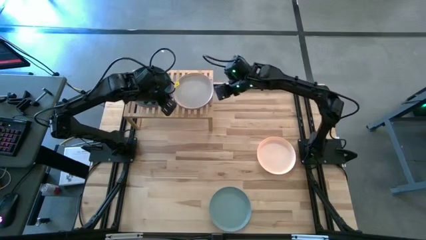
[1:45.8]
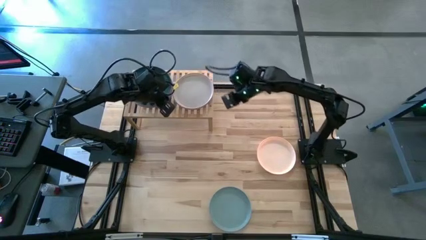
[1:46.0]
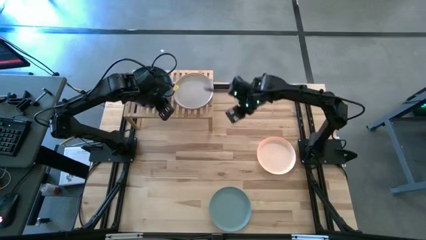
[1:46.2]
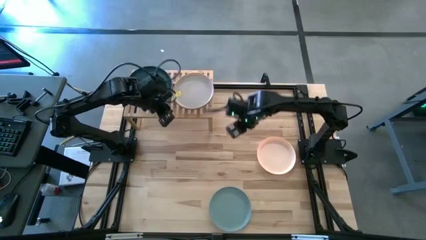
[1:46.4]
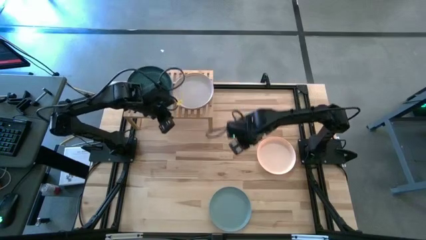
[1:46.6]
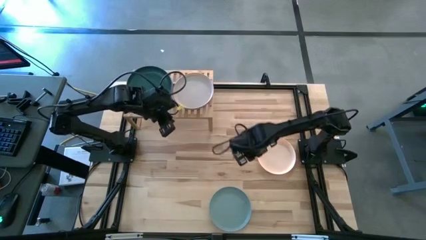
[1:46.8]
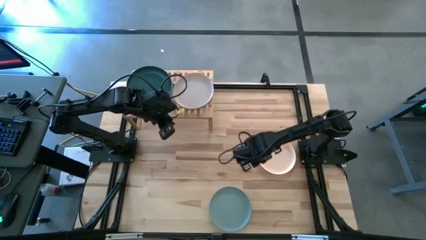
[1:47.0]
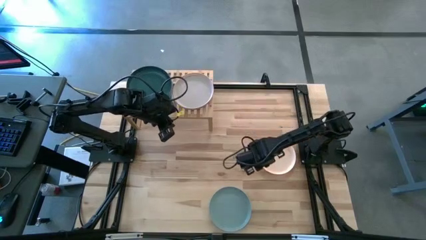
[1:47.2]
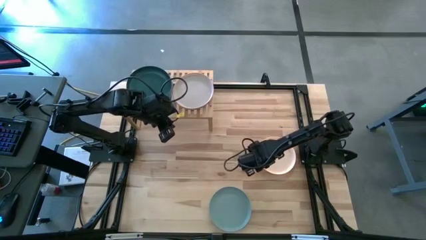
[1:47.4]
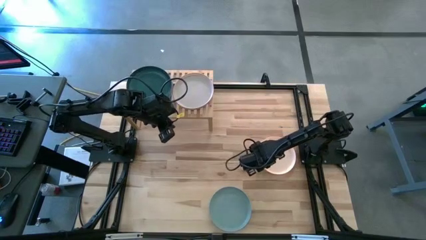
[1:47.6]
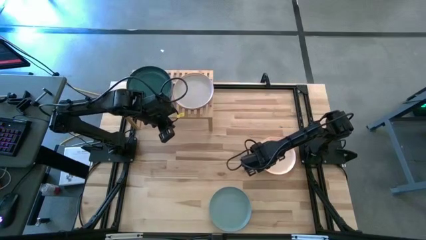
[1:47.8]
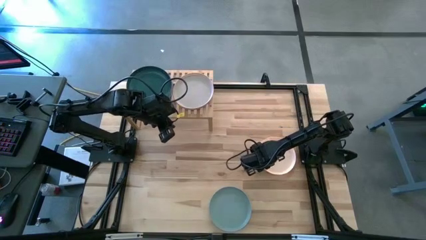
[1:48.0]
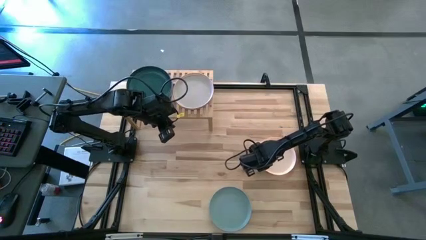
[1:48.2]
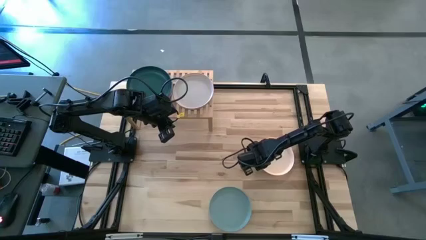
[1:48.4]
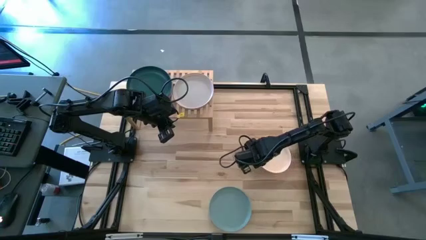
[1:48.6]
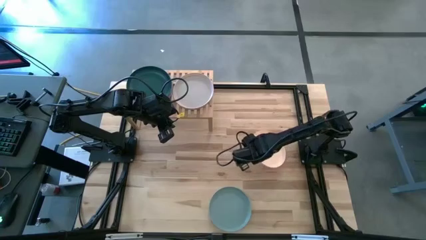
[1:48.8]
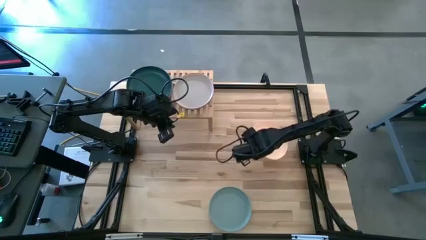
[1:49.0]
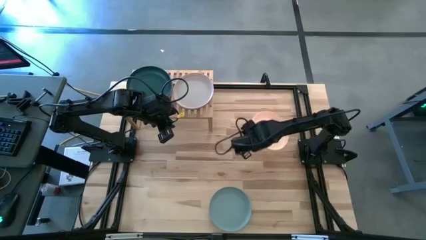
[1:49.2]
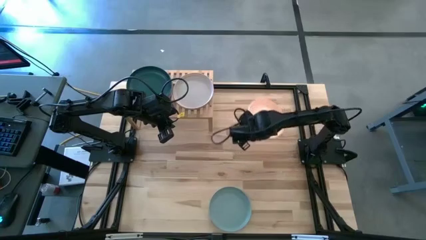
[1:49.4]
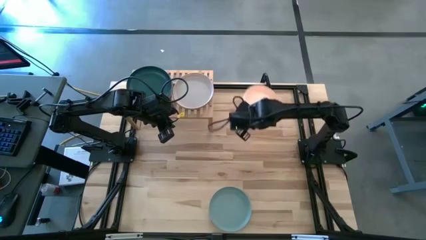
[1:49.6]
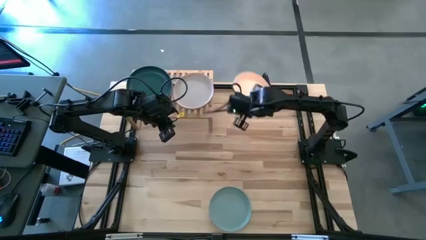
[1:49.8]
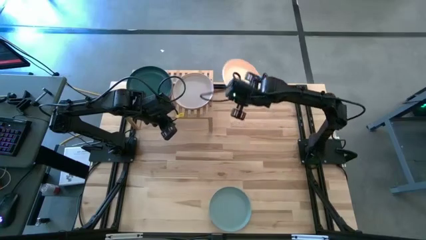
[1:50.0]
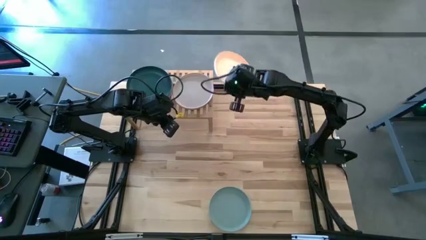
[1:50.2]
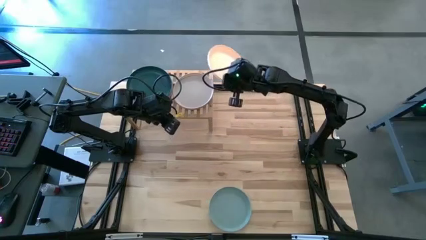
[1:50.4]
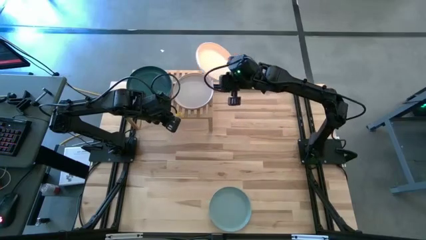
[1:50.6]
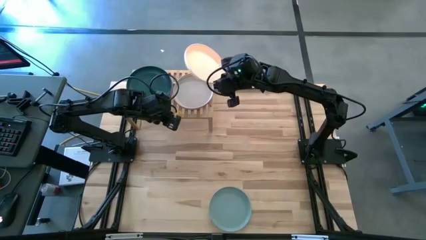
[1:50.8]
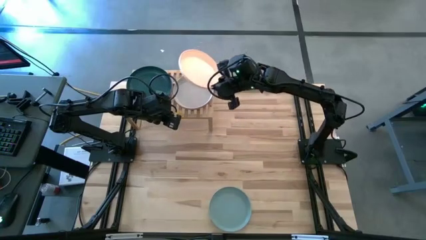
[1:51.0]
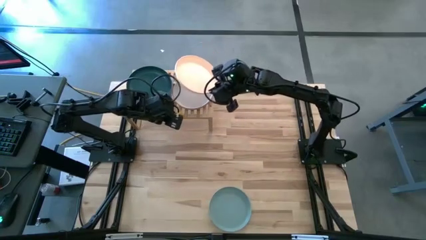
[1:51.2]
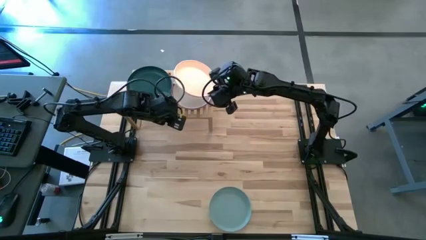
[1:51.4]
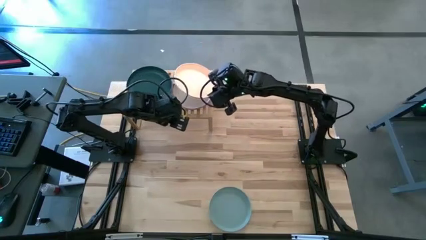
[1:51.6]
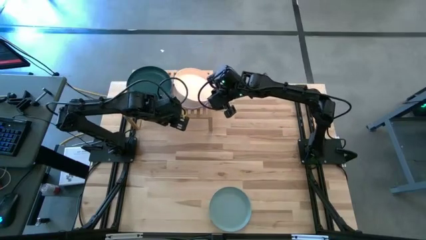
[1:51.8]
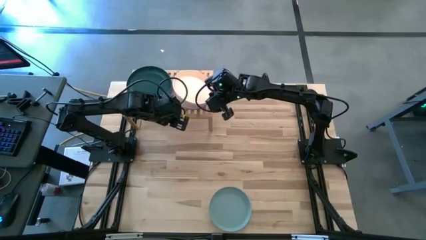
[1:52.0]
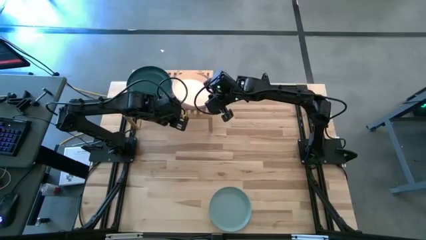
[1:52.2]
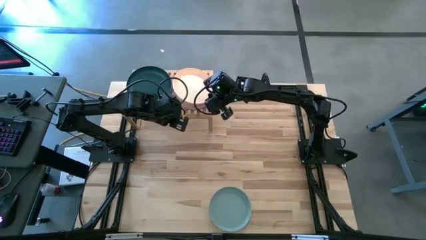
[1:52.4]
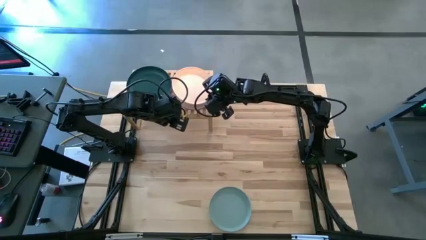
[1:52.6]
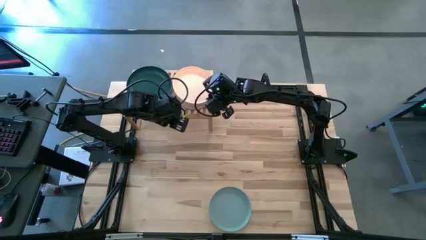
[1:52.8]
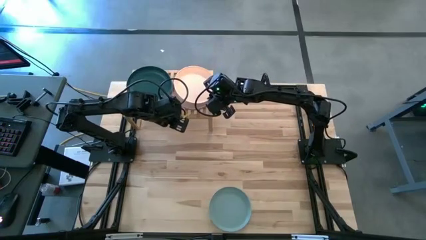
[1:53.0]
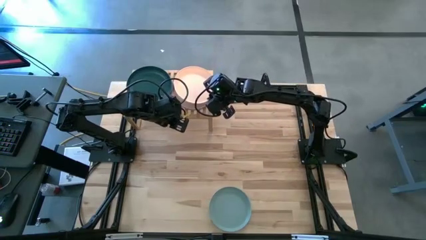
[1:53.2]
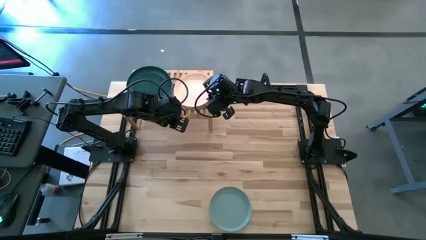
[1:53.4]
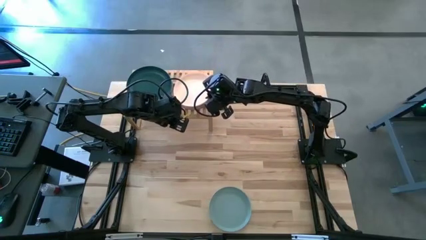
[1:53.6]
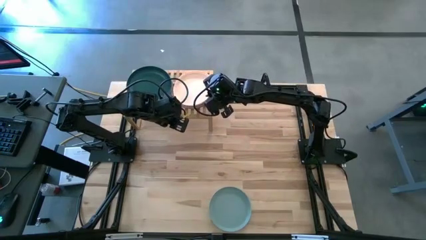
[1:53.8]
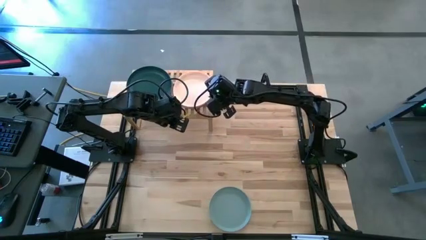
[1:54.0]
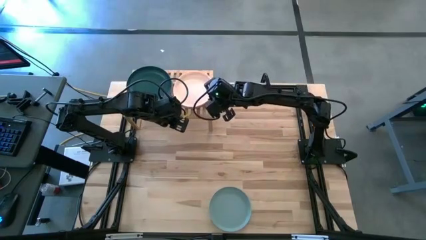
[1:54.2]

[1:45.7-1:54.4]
Task: Place and stack plates onto a shelf
Stack the white plate on the gray plate

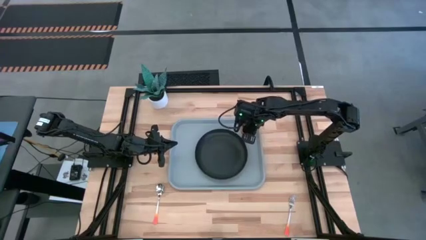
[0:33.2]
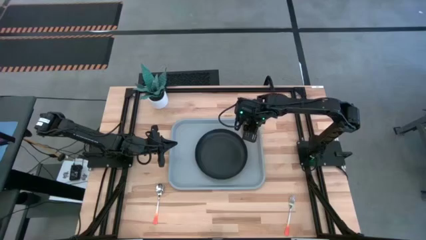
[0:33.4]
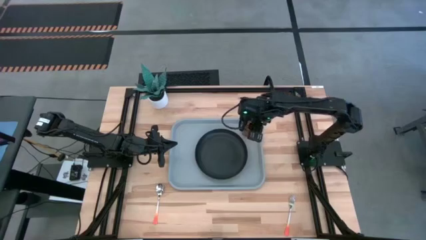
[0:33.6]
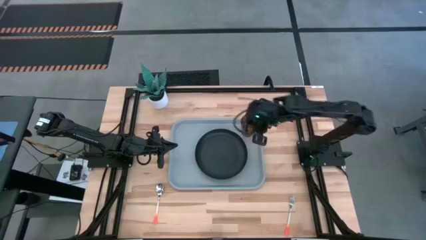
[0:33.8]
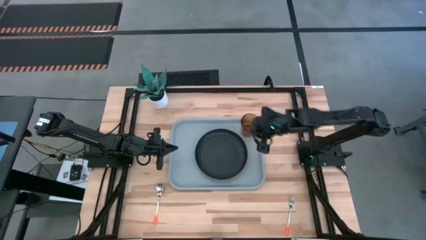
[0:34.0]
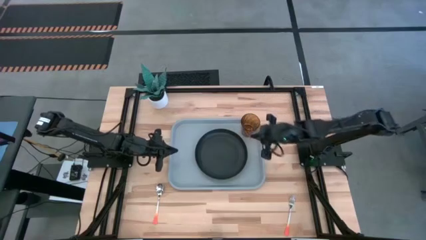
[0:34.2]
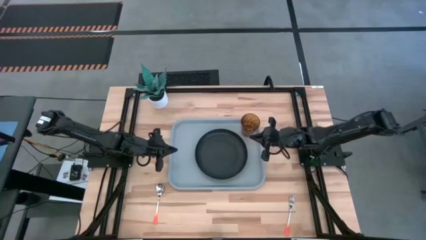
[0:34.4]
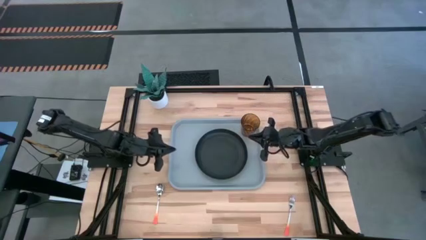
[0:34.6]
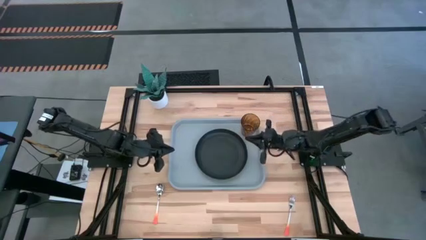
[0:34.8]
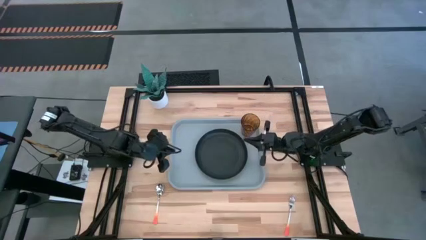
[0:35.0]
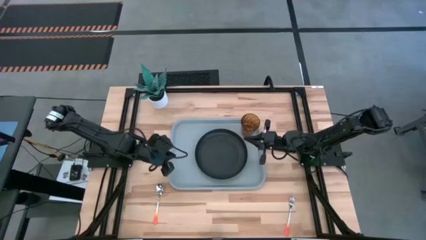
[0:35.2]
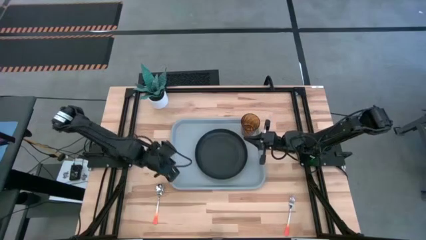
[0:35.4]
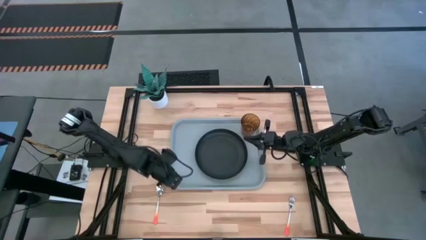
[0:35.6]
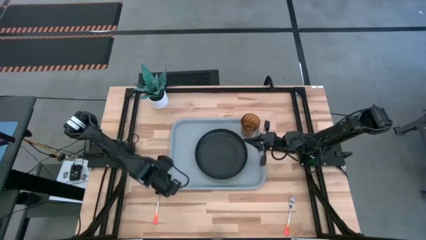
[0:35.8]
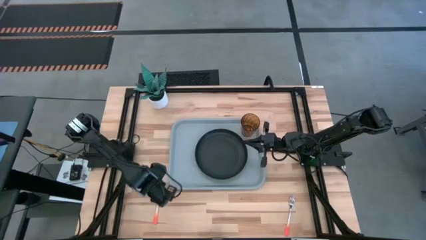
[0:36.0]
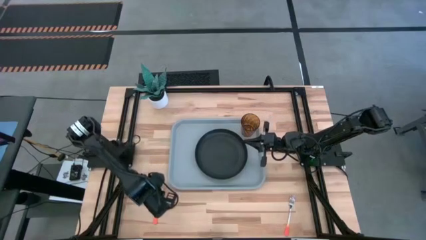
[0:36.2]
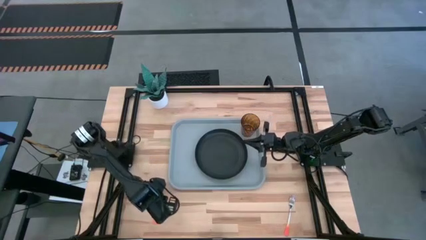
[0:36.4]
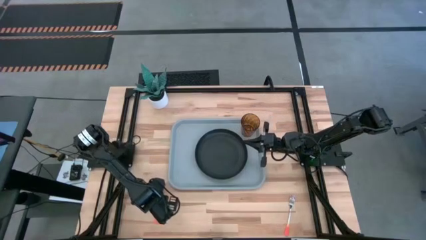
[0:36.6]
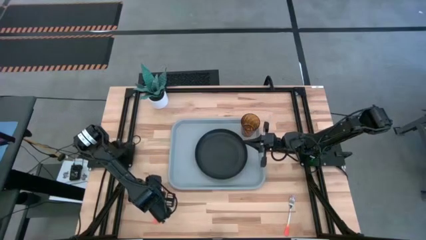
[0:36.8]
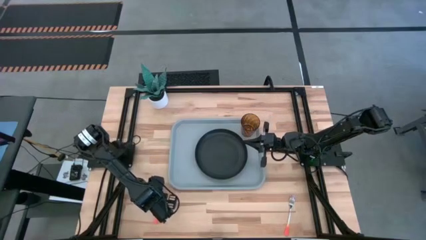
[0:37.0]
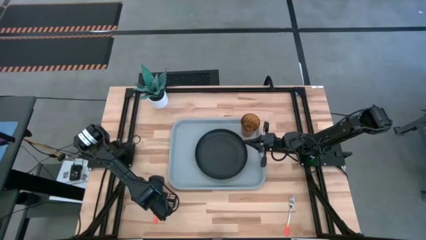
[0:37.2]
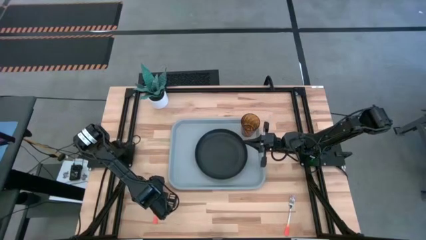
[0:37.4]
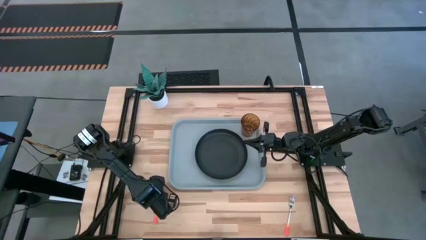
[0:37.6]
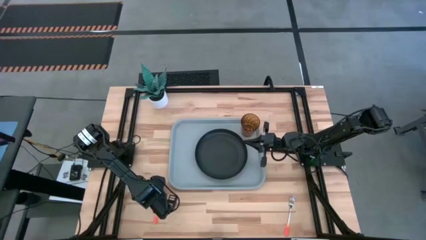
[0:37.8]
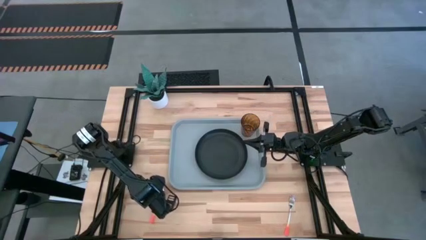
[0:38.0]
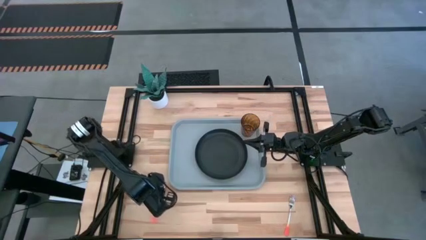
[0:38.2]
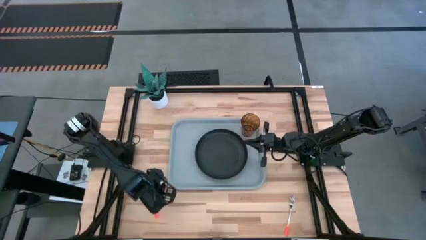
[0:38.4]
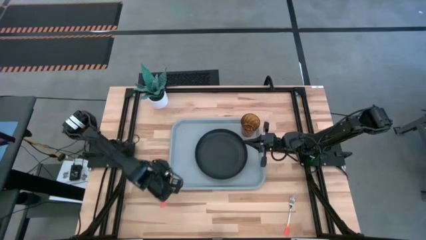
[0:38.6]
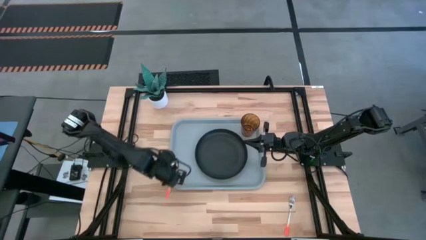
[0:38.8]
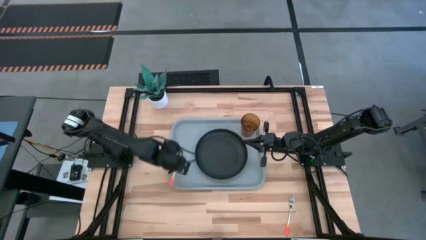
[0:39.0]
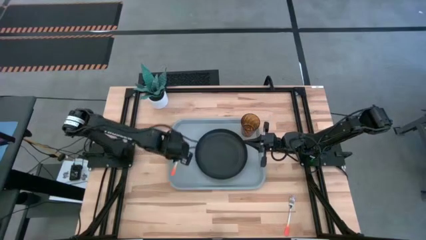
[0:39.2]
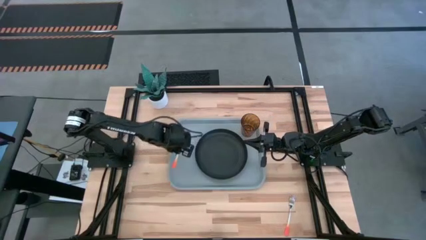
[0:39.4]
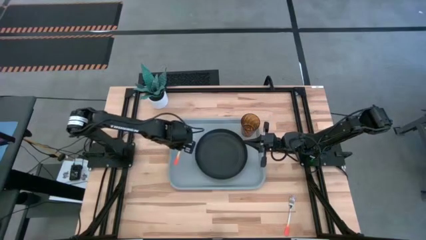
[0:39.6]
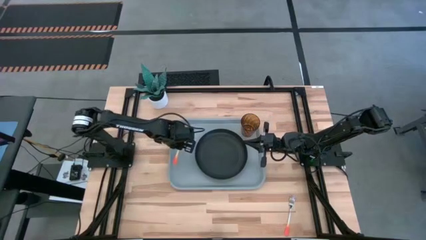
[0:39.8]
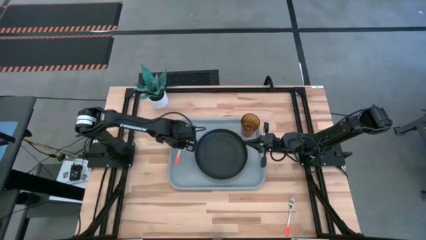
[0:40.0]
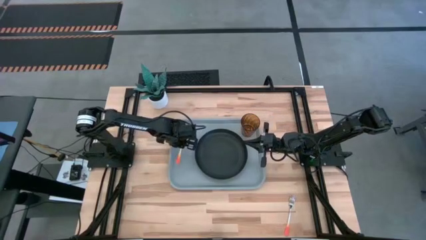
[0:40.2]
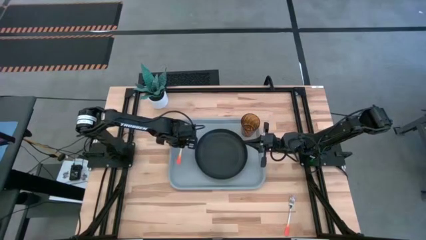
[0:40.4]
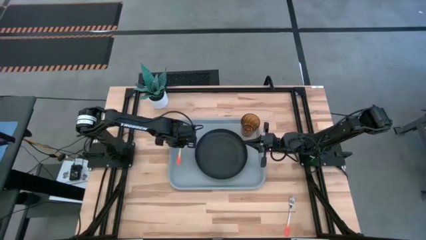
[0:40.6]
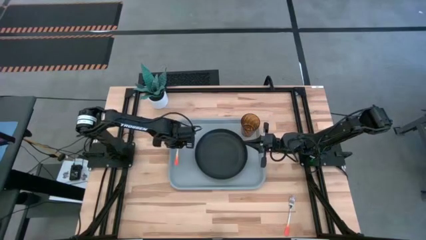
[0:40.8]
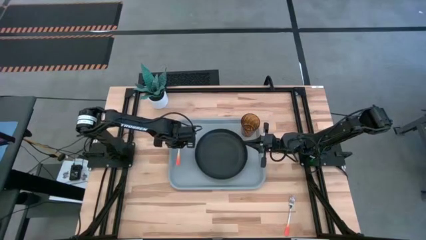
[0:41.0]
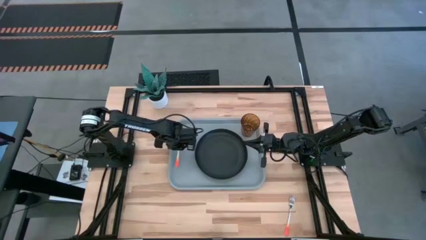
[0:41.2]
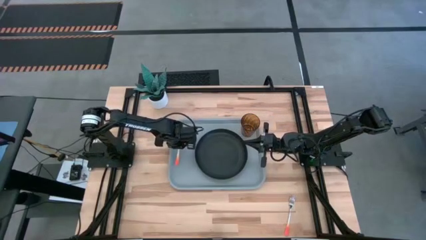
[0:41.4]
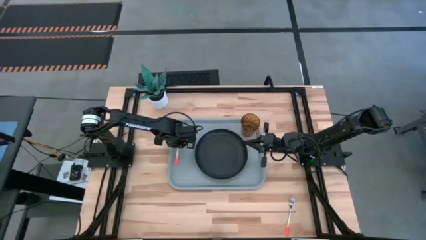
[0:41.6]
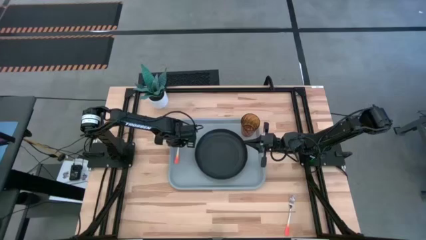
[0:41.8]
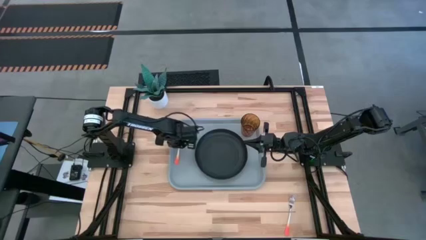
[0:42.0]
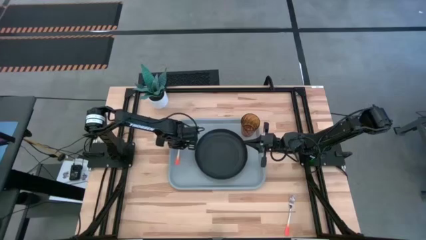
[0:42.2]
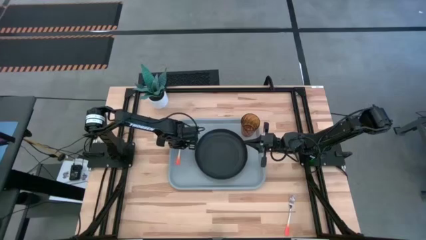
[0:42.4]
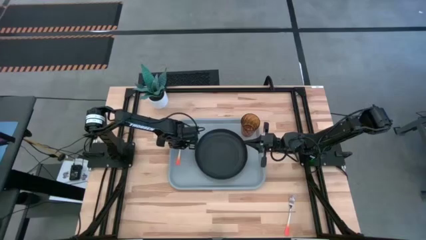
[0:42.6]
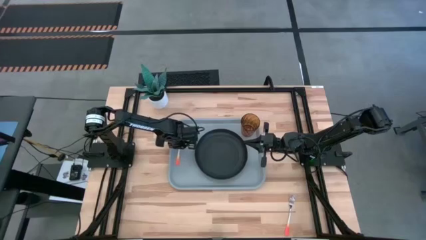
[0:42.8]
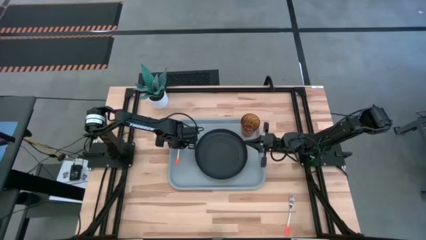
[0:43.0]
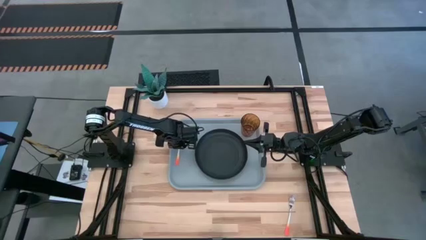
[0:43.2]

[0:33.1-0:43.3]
Task: Pick and place plate/cup/fork/spoon on tray
Put the orange spoon on the gray tray to the left of the black plate
